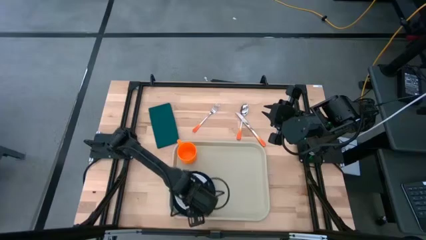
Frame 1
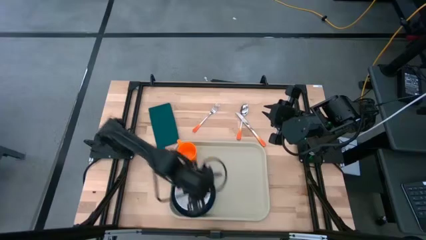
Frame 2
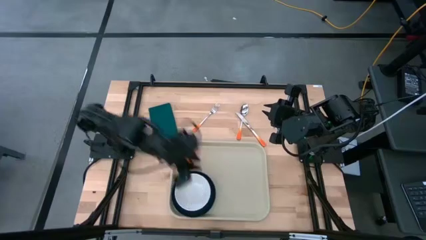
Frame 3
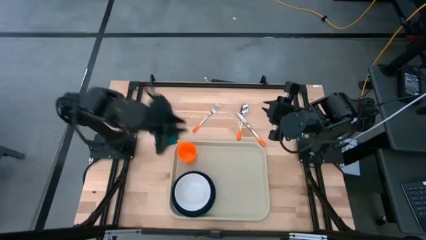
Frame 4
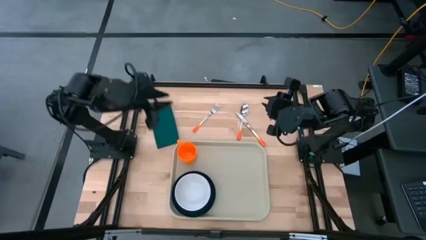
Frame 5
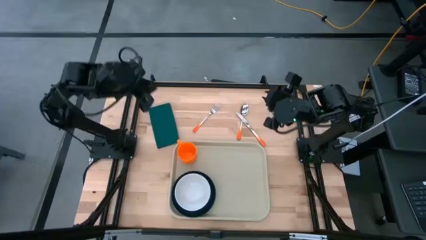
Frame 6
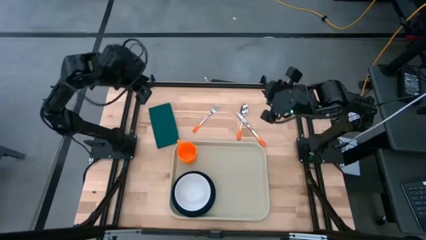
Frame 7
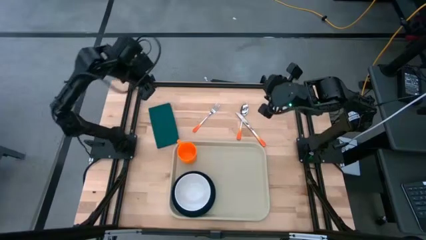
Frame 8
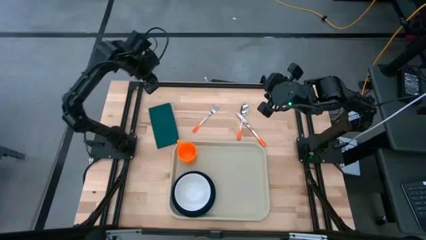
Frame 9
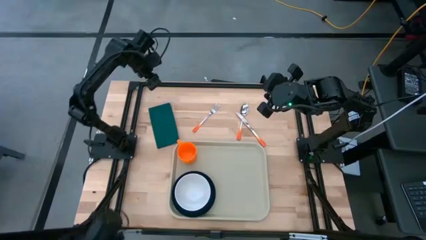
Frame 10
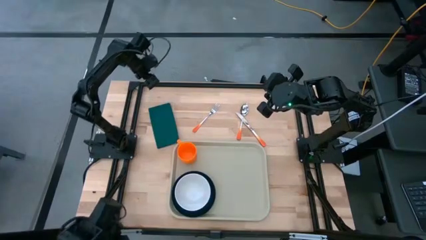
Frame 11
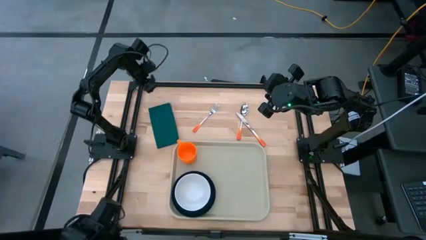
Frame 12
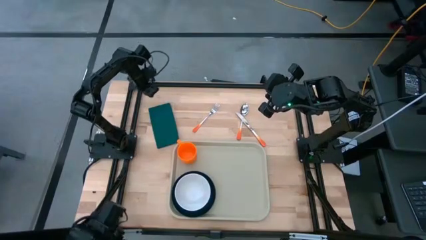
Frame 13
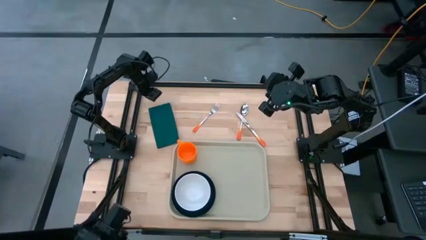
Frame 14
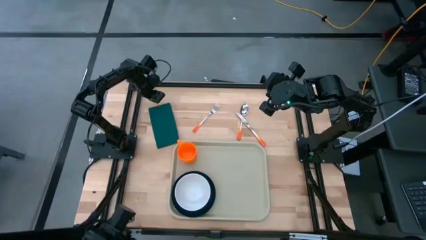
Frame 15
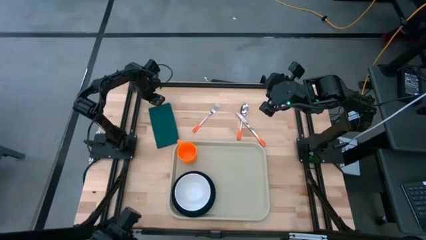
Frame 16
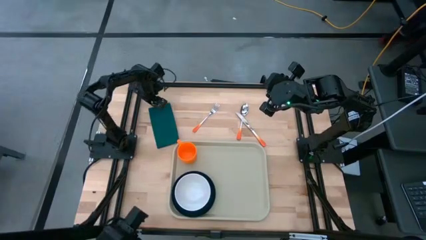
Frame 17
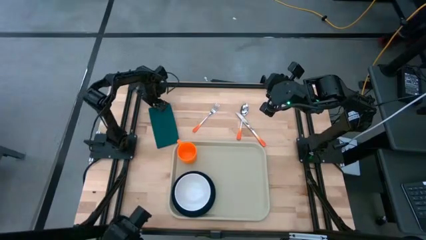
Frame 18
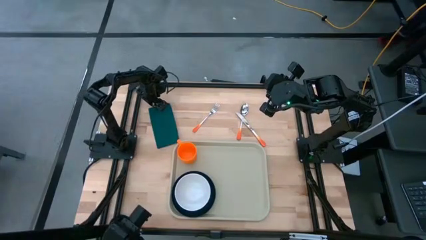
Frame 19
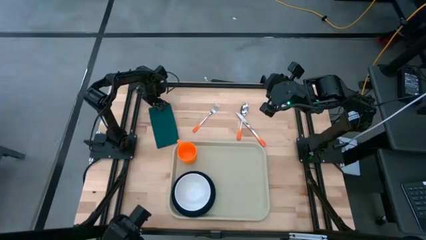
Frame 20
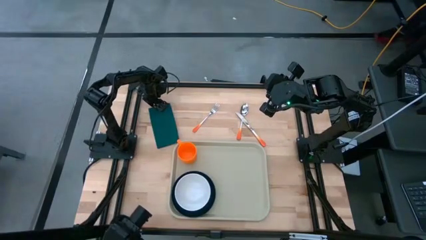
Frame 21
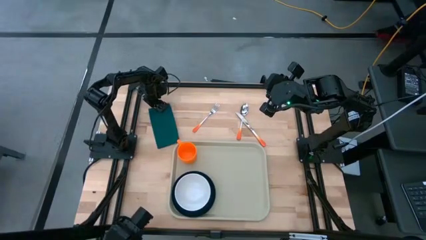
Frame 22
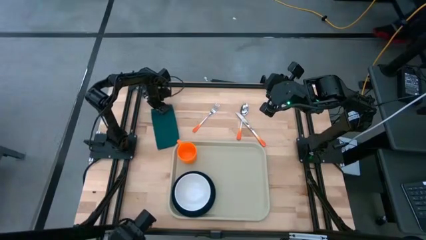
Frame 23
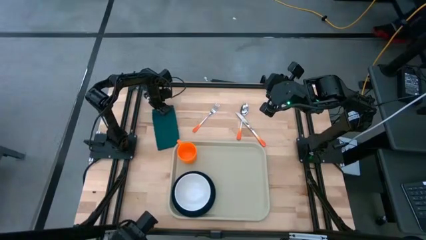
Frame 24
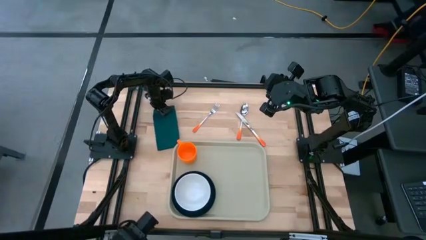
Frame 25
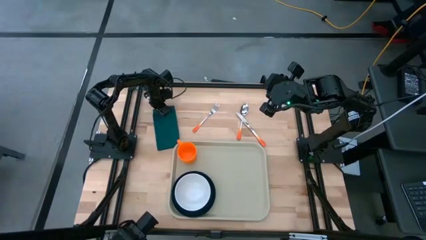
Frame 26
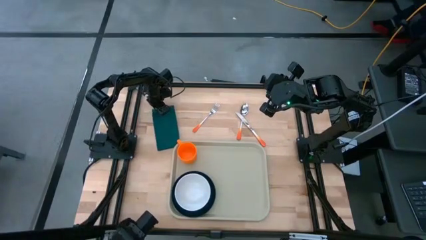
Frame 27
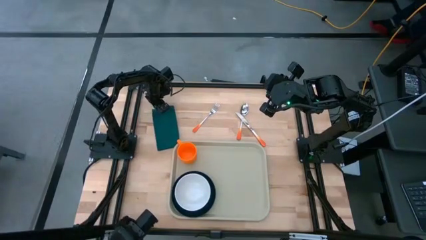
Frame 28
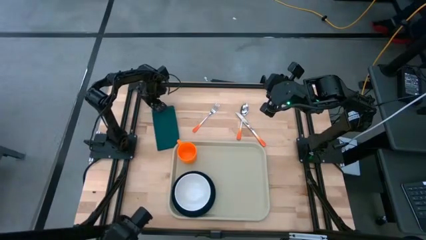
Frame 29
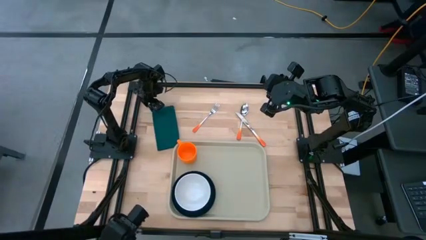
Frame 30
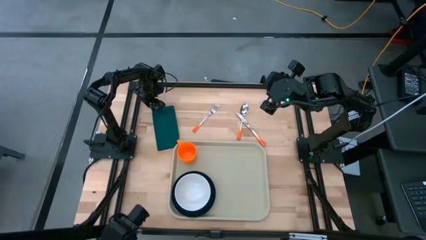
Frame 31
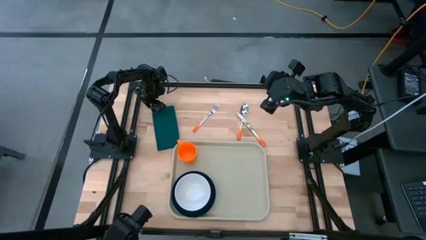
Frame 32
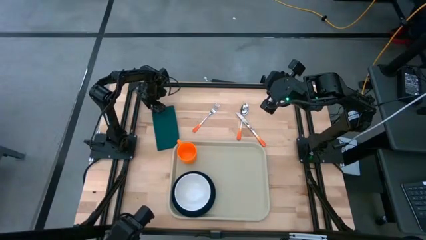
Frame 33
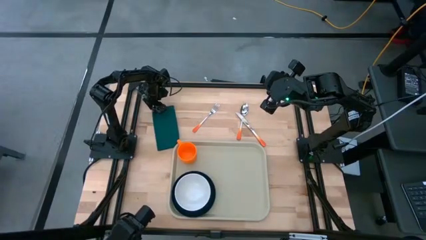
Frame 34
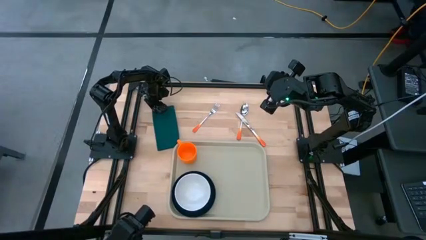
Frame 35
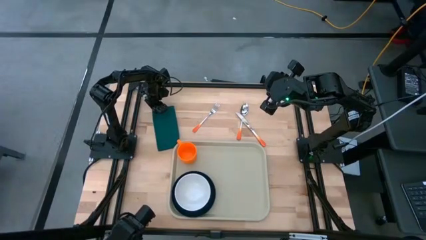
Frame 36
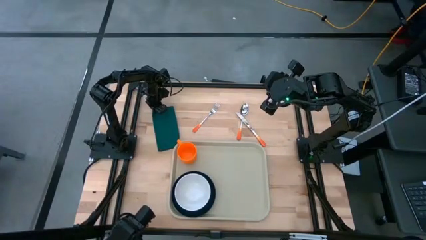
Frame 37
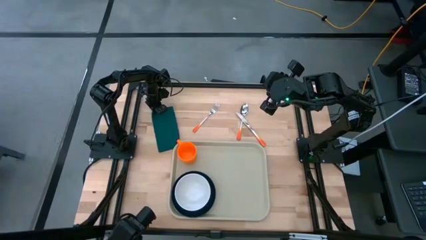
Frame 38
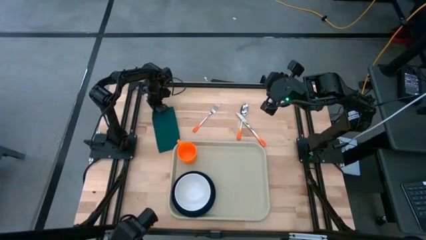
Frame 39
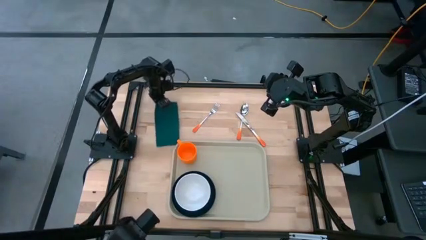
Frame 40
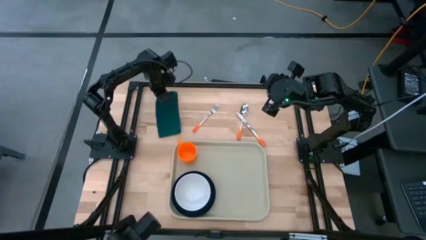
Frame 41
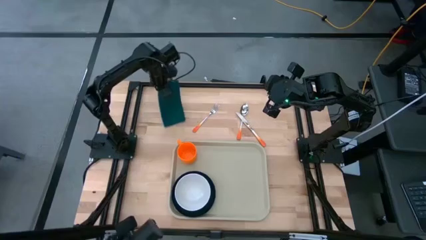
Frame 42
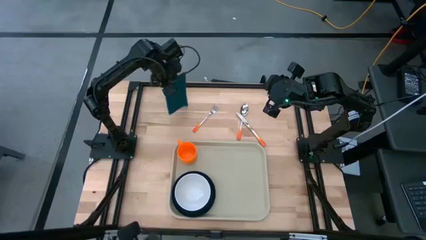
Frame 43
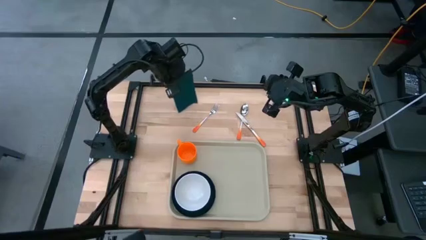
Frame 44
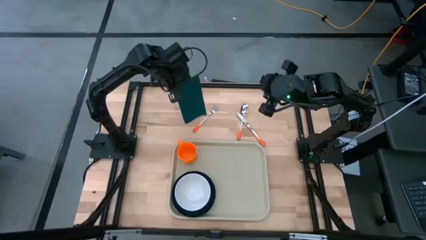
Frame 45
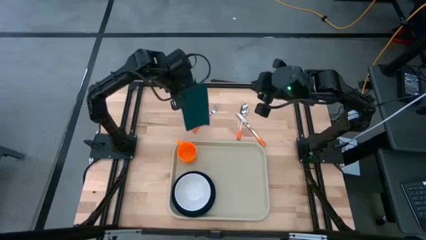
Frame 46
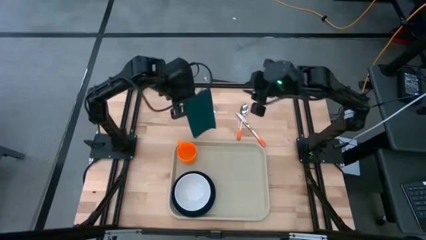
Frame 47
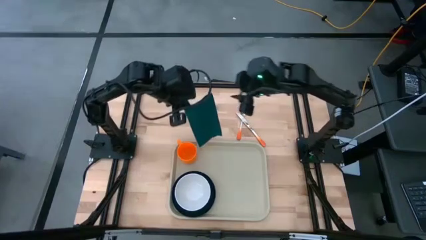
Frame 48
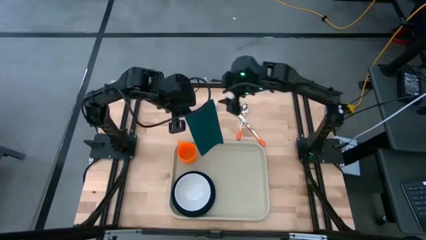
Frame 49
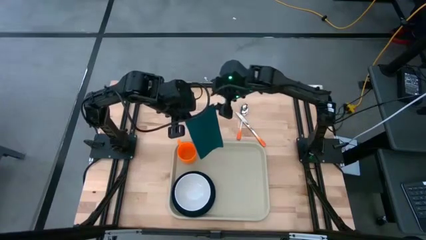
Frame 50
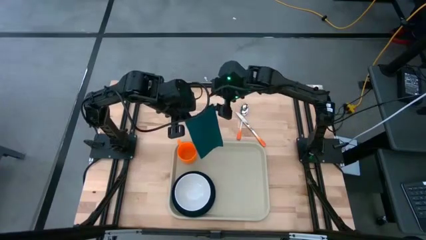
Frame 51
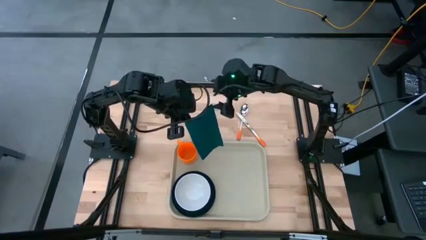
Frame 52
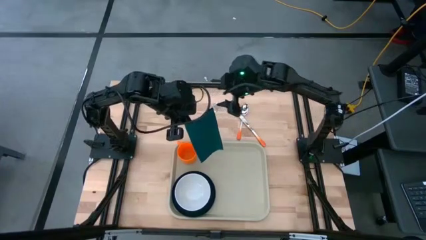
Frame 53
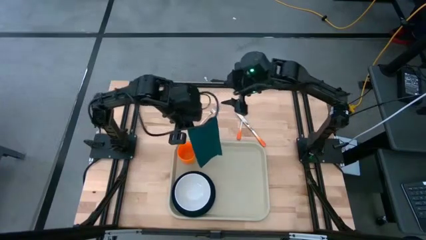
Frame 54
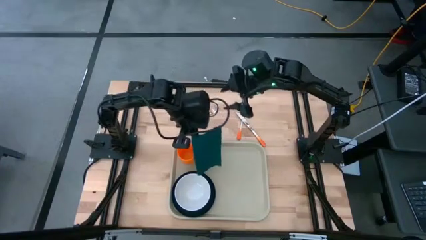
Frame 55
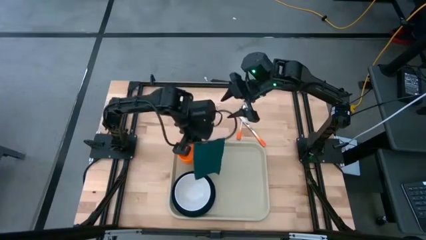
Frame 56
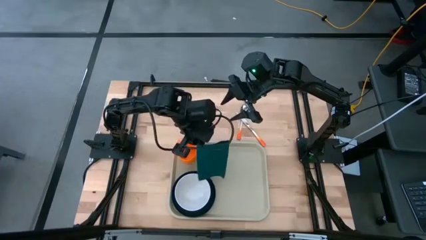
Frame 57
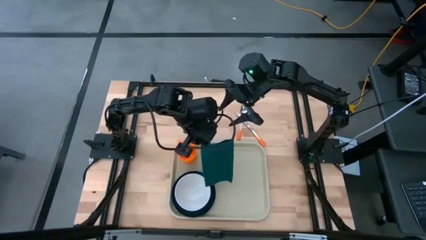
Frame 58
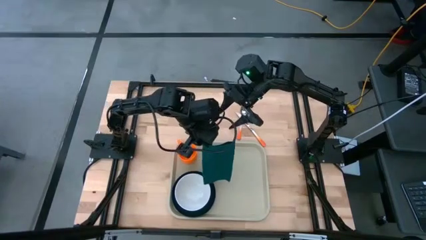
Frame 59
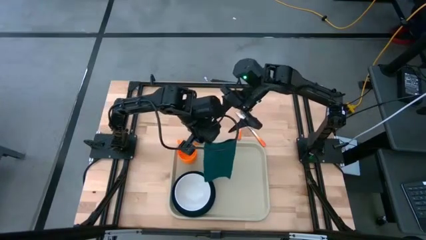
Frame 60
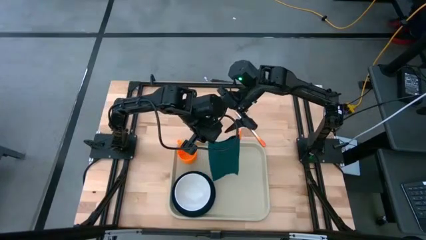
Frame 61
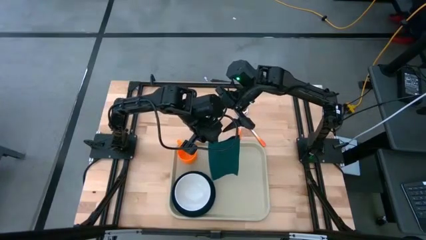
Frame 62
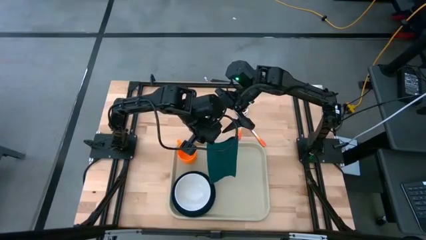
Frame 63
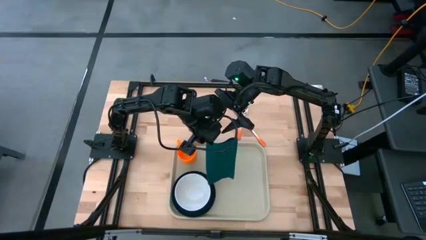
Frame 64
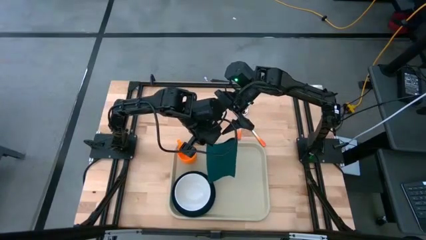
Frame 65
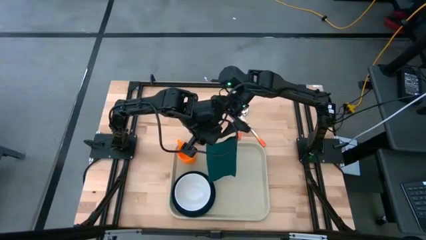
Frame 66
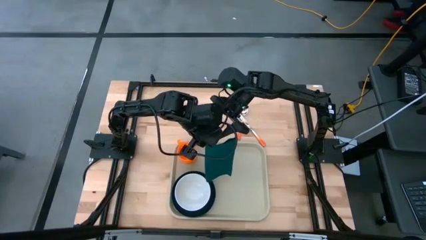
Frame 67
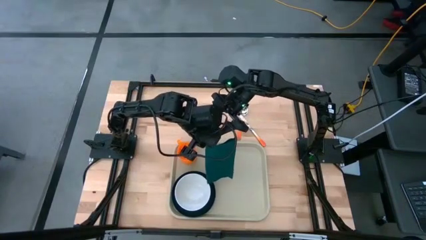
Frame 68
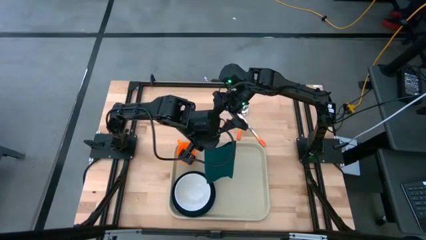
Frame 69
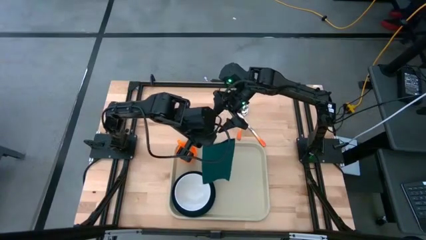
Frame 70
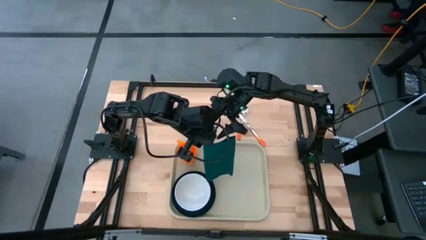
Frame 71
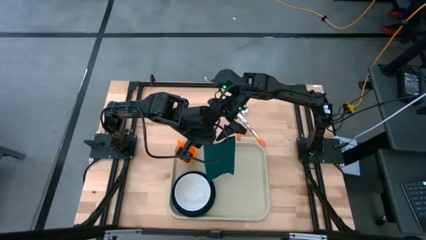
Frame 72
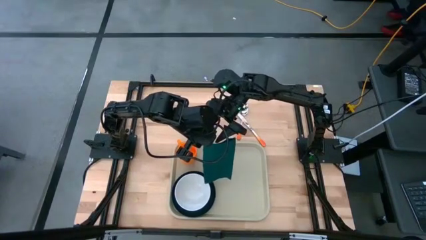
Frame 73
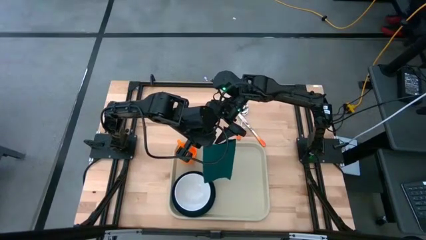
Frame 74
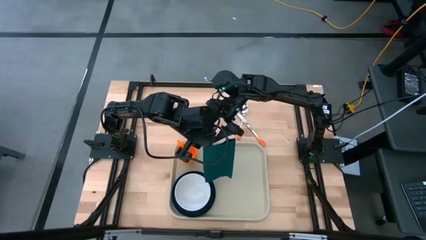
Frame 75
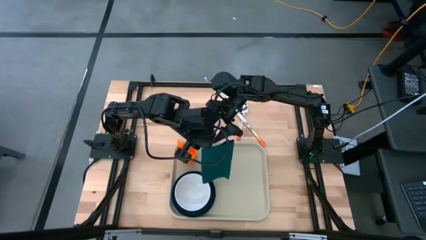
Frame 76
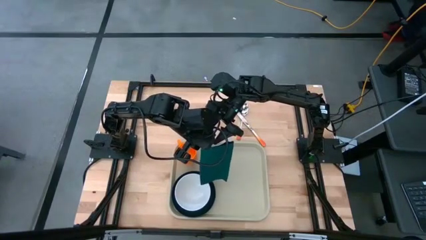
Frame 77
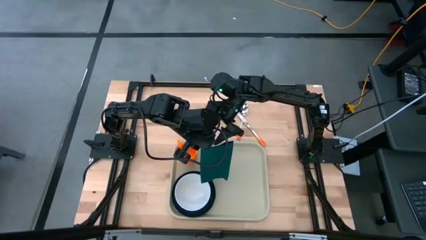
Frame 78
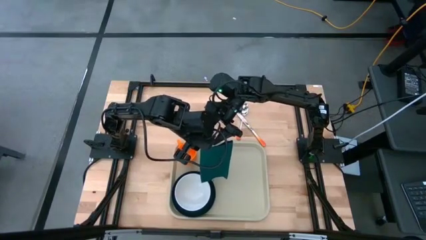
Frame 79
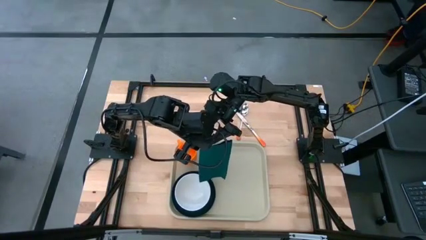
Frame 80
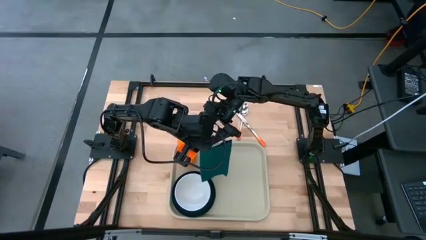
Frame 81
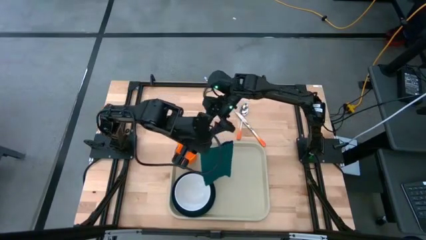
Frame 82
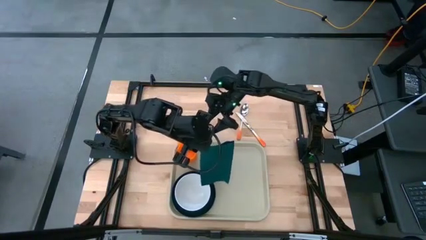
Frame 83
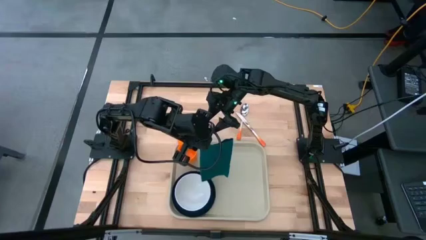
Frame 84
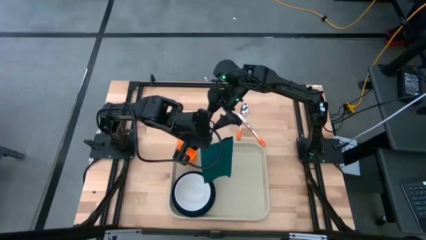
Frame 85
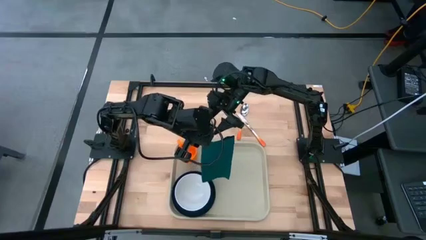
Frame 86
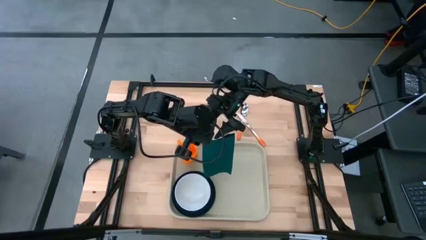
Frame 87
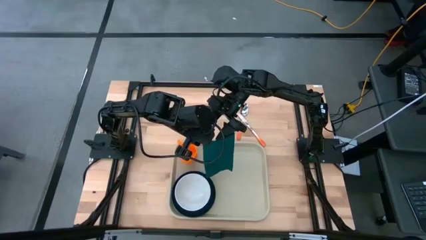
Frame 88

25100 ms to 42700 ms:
Task: Set up tray
Put the napkin on the tray to the right of the plate
